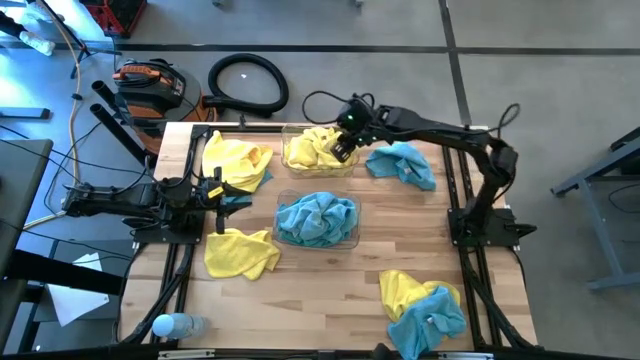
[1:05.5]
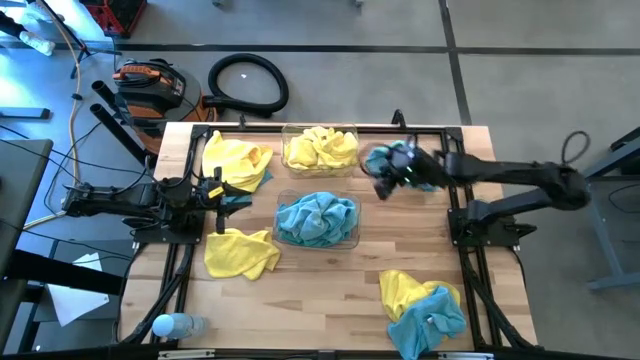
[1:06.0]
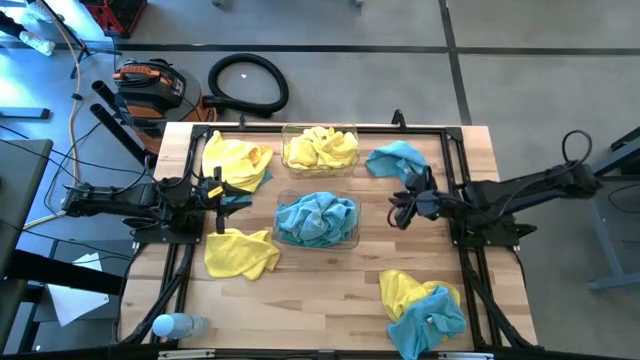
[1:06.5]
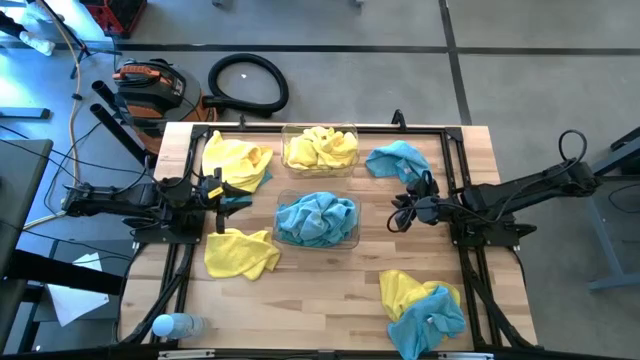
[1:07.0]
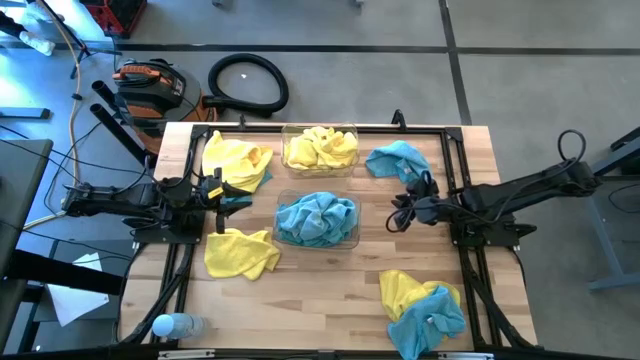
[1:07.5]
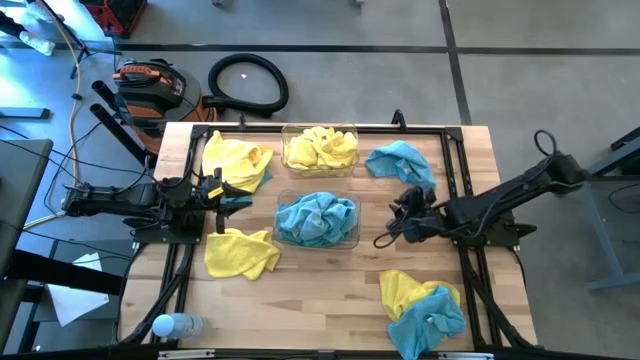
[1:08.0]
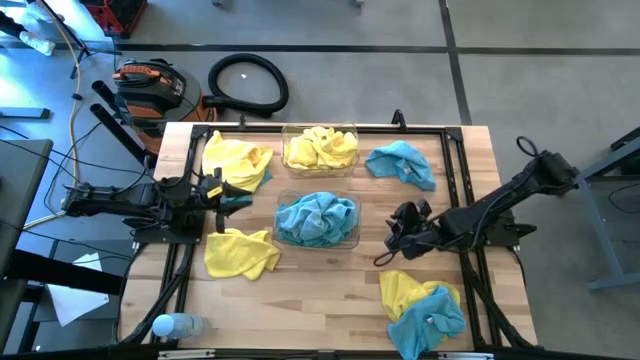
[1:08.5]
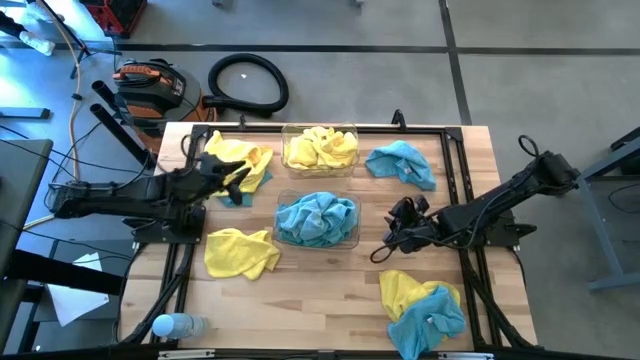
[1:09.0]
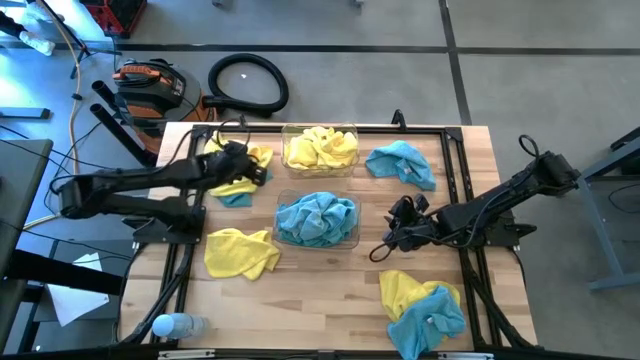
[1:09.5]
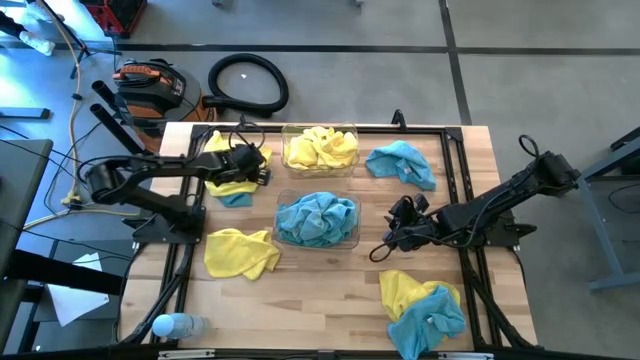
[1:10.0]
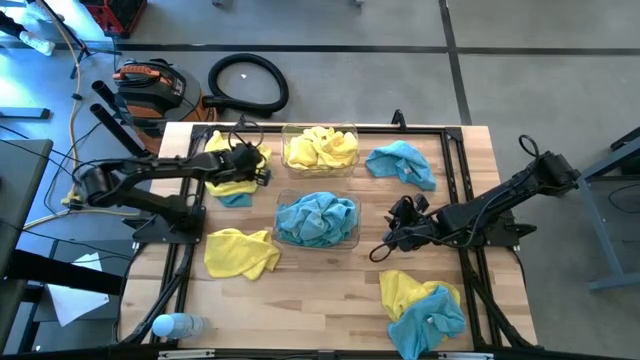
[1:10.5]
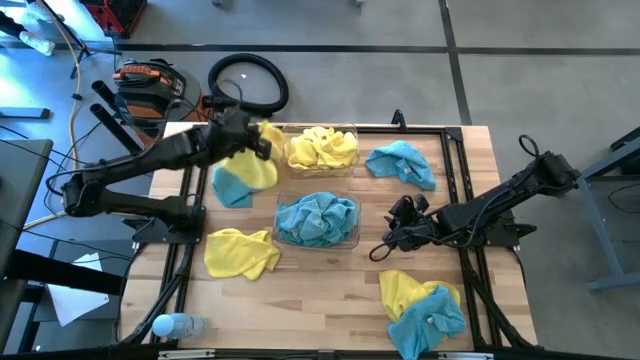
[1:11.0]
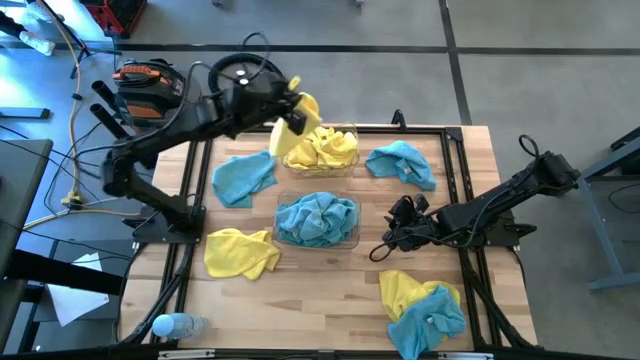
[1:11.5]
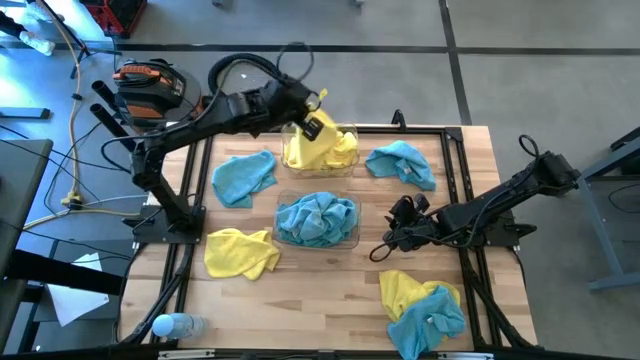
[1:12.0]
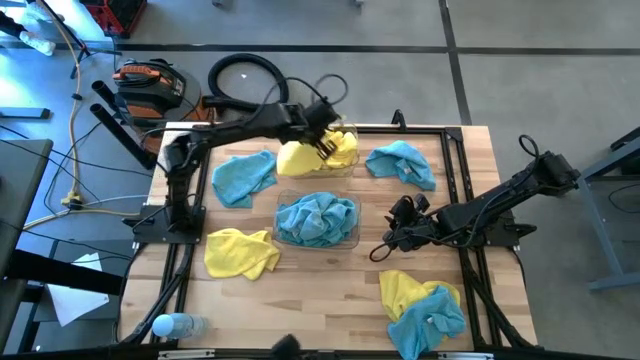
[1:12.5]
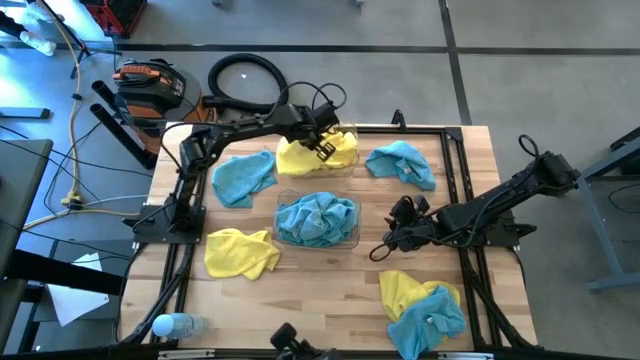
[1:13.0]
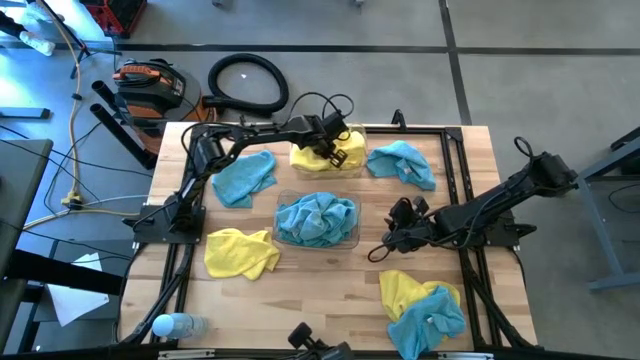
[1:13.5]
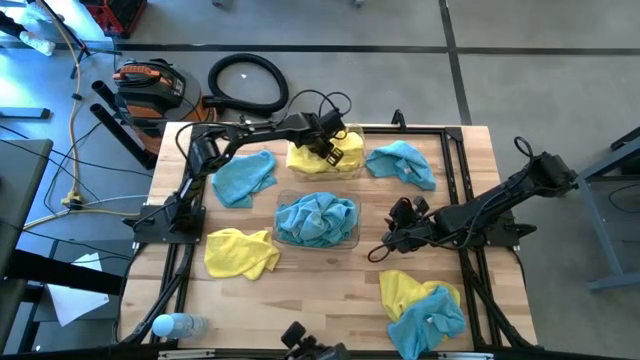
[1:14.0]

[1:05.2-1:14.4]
Task: Sort microfiber towel by color & place in baskets
Put the yellow microfiber towel into the top transparent bin

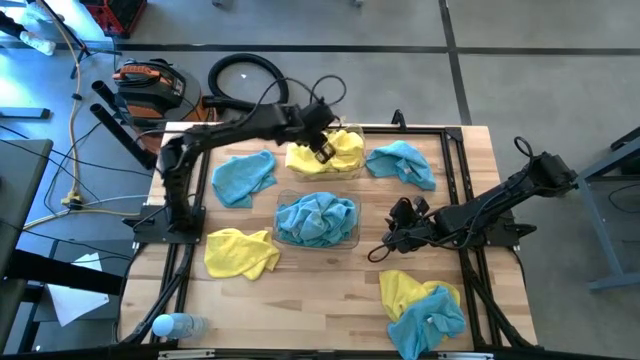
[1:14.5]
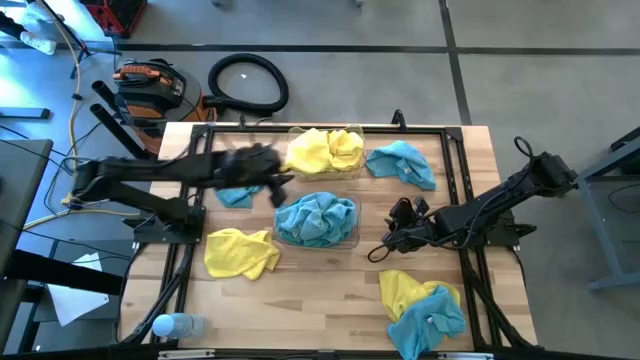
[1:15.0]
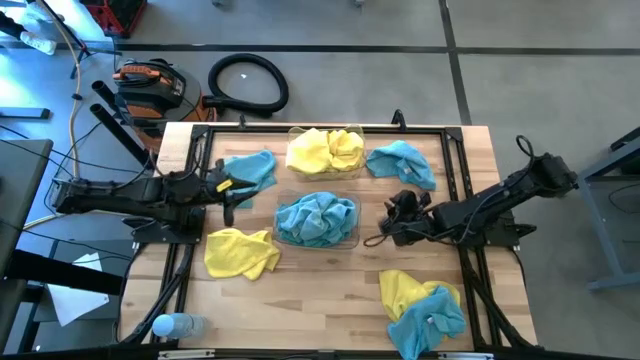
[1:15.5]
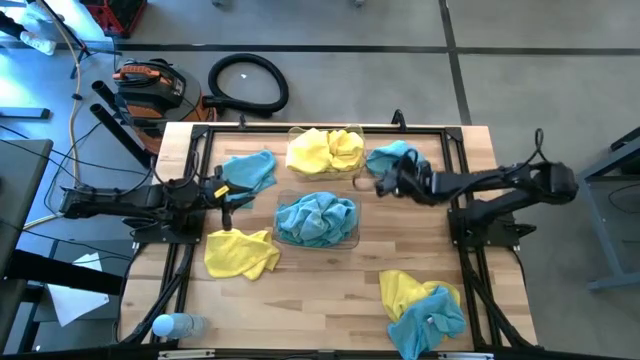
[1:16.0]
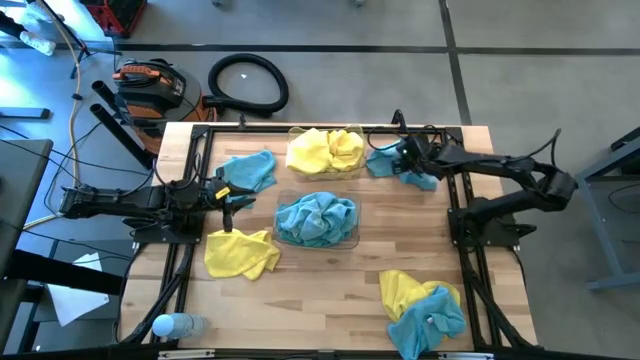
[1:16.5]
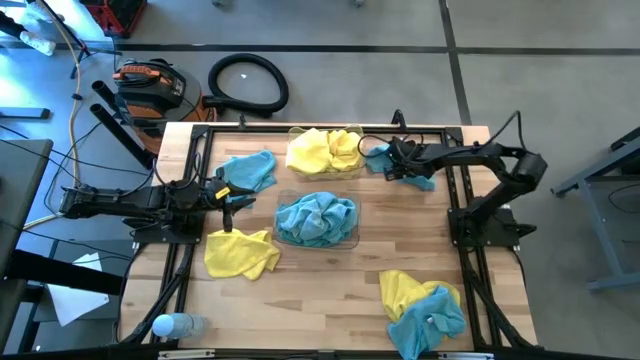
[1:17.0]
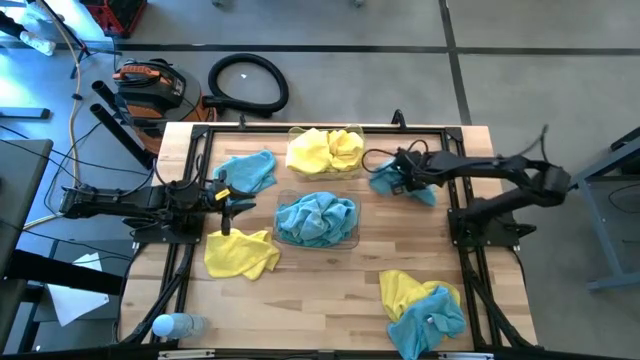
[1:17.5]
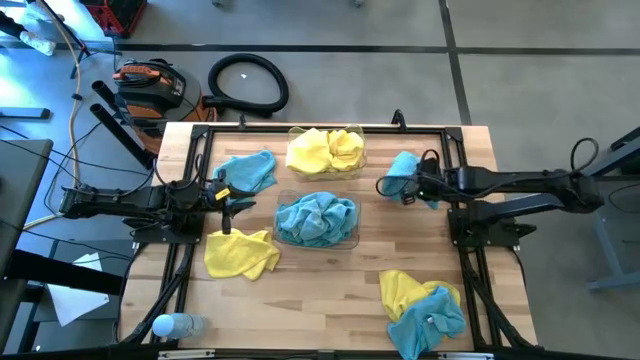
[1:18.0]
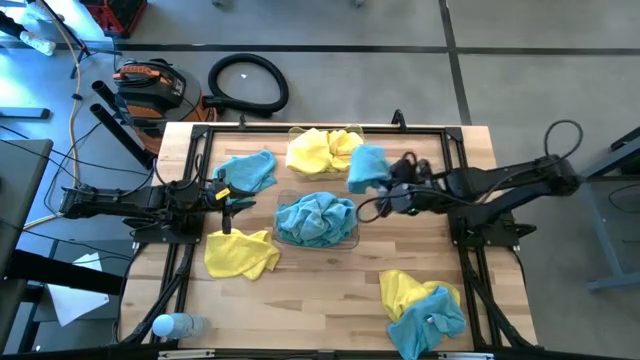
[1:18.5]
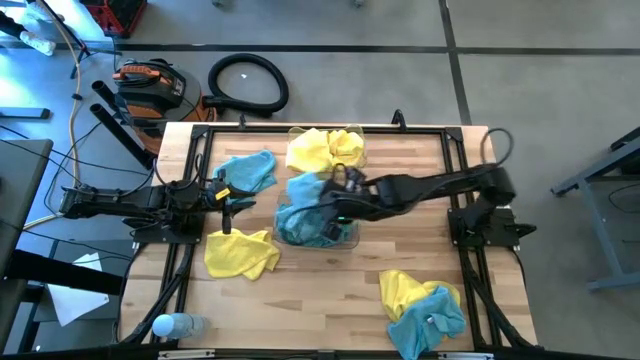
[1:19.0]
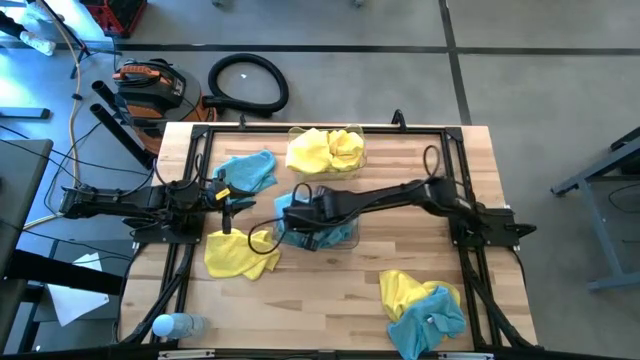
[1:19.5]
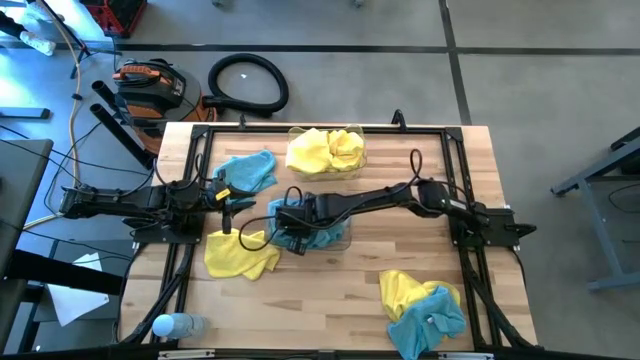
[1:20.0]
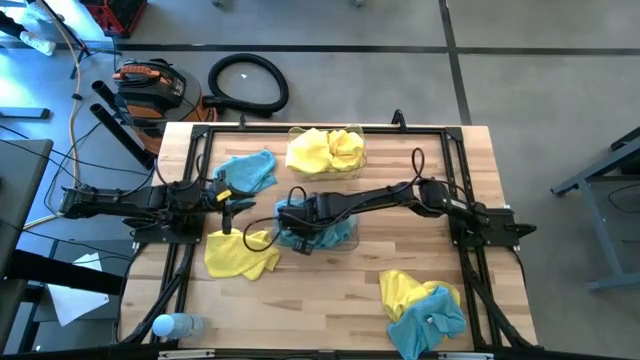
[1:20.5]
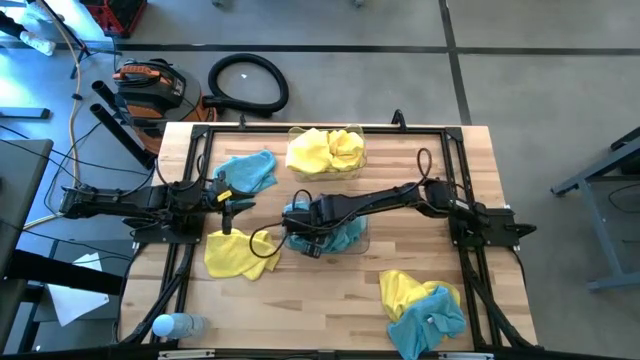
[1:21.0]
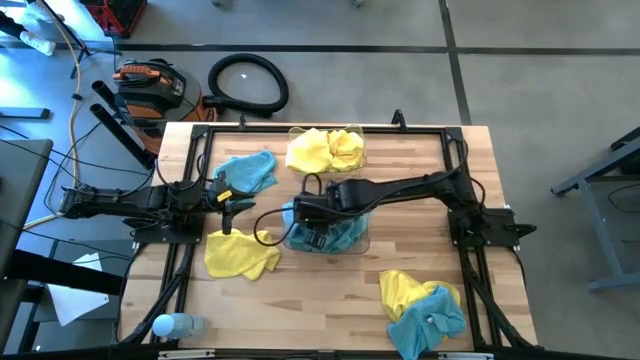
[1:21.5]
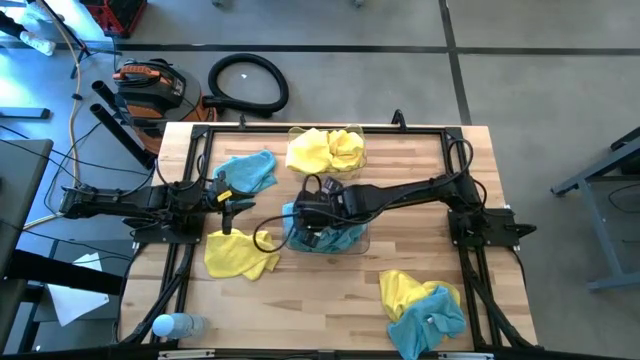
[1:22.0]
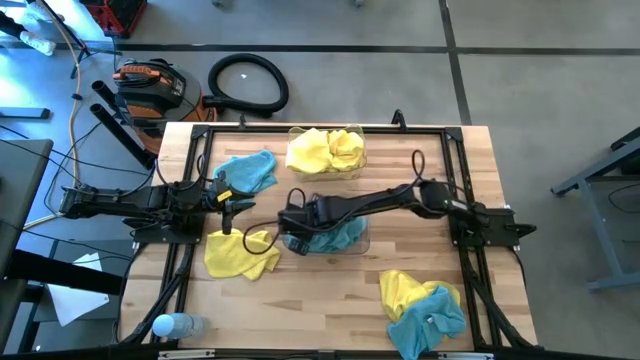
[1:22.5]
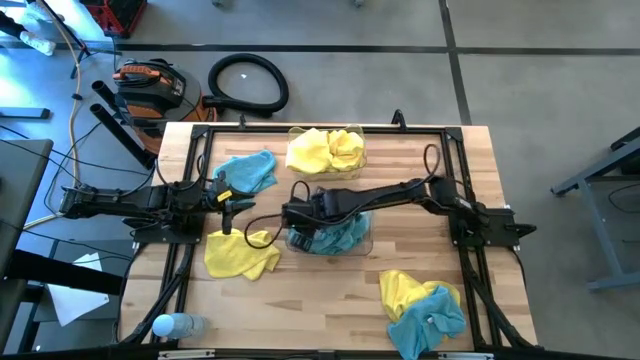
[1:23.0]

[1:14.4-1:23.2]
Put the blue microfiber towel into the bottom transparent bin

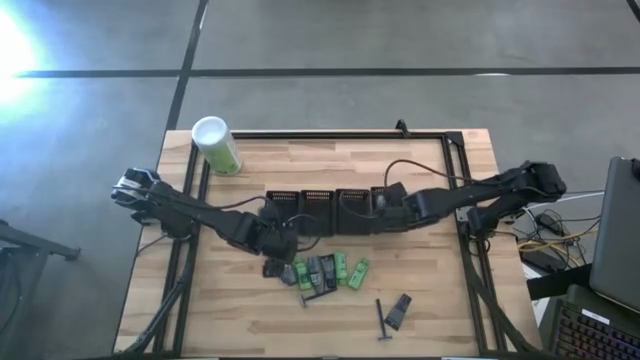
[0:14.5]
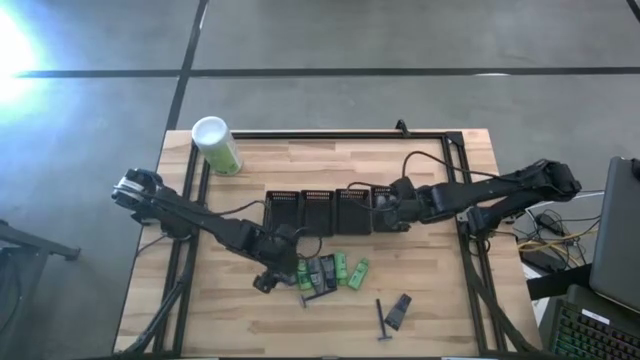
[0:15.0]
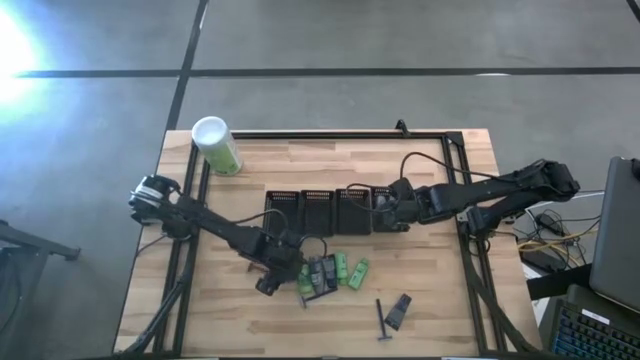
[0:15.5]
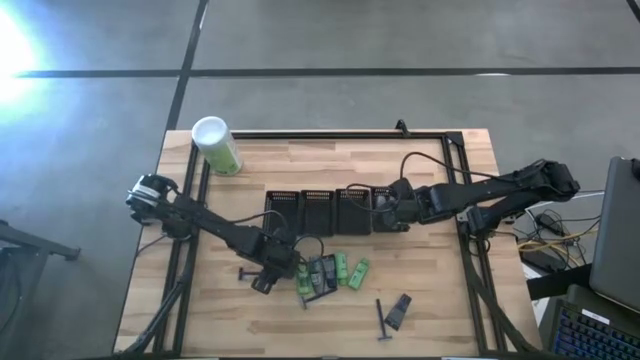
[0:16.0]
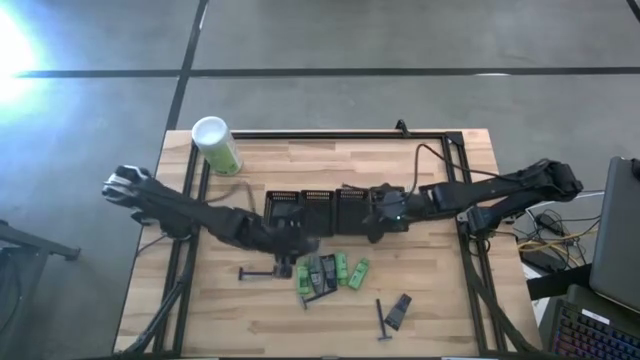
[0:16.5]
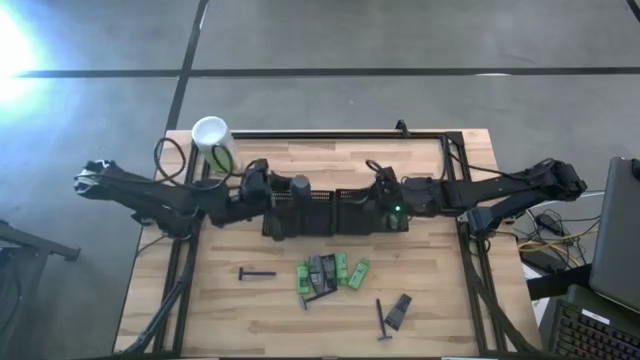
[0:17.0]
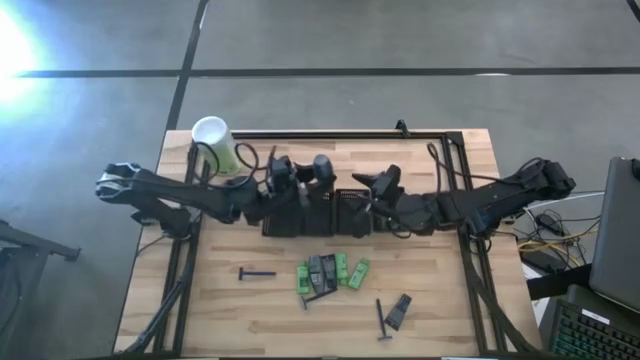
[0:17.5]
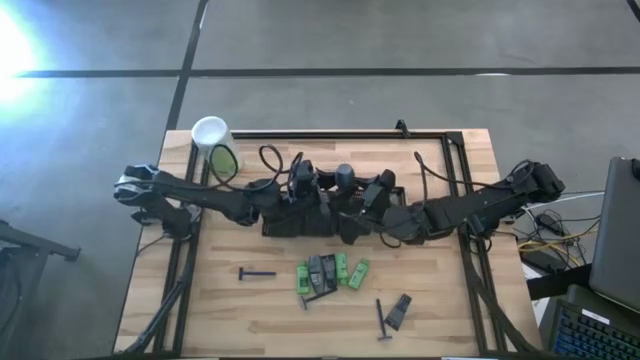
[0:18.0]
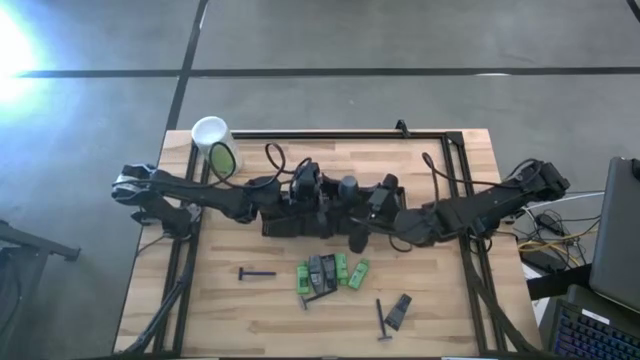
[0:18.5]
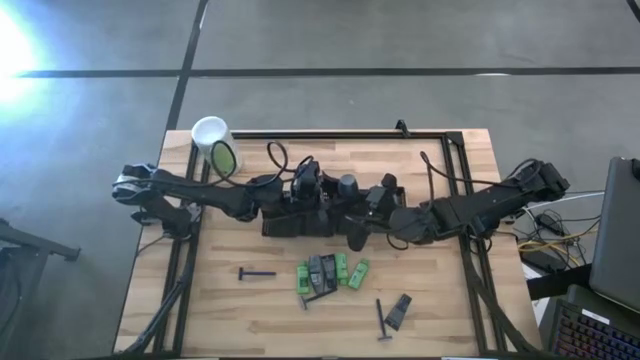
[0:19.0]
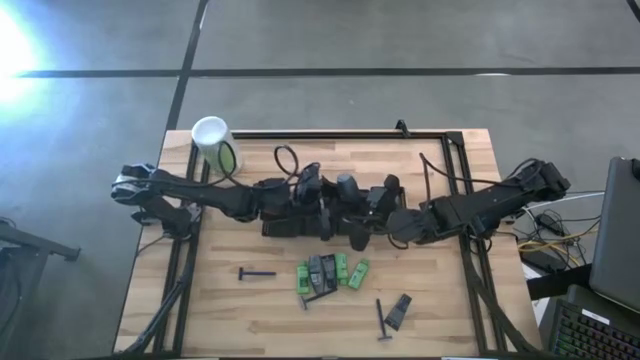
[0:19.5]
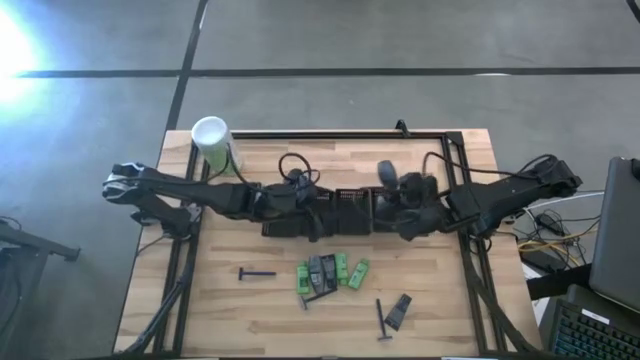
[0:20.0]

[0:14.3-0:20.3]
Task: Pick & Place Travel size toiletries
Put the gray deodorant into the right black basket
